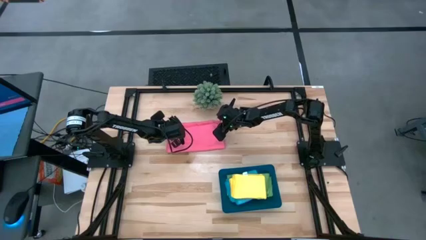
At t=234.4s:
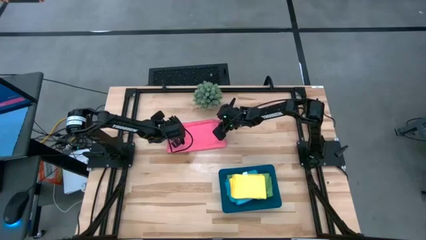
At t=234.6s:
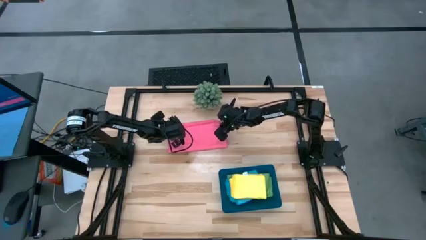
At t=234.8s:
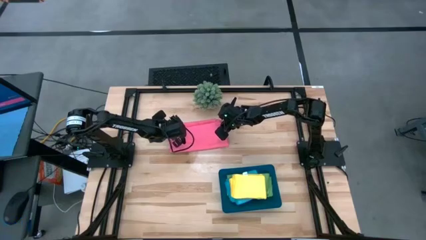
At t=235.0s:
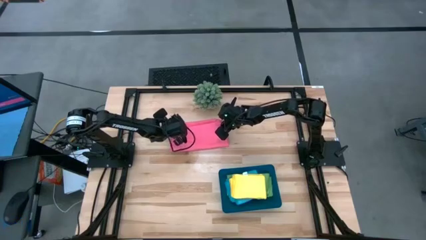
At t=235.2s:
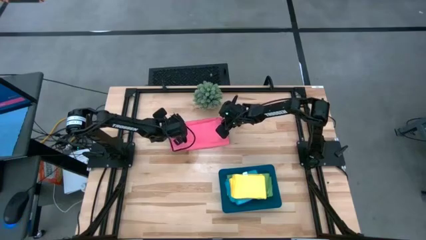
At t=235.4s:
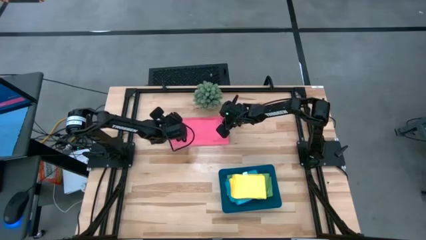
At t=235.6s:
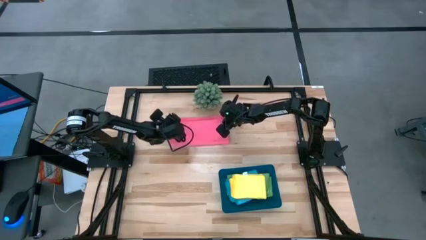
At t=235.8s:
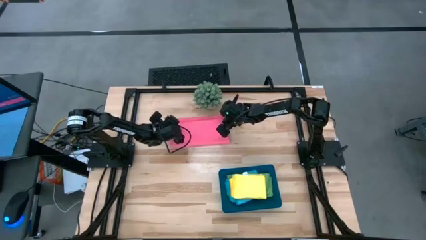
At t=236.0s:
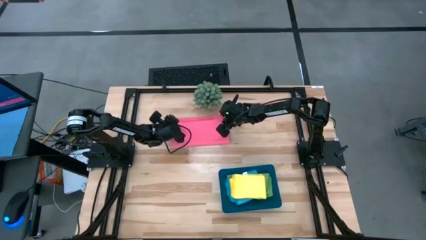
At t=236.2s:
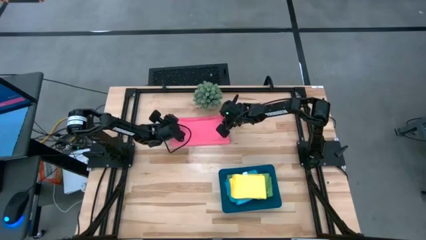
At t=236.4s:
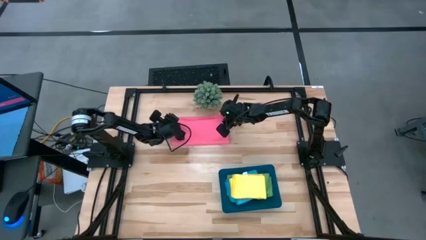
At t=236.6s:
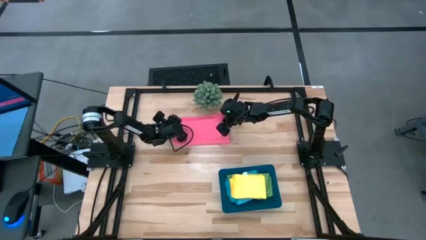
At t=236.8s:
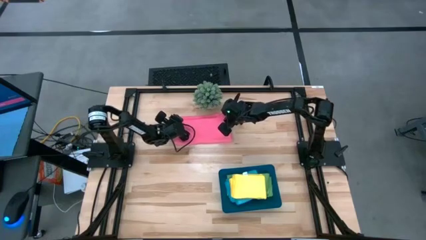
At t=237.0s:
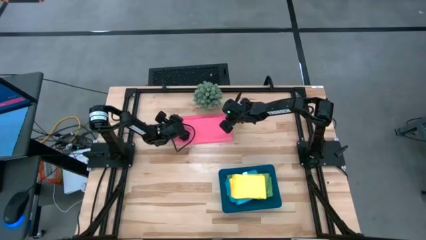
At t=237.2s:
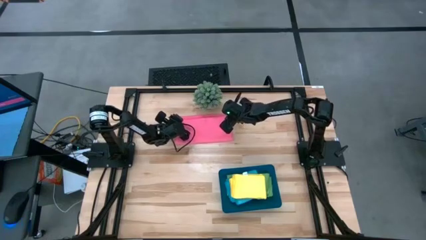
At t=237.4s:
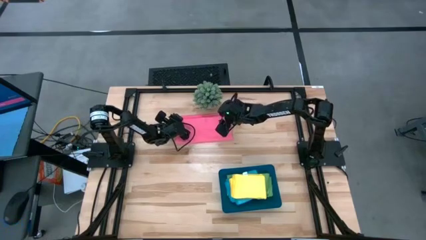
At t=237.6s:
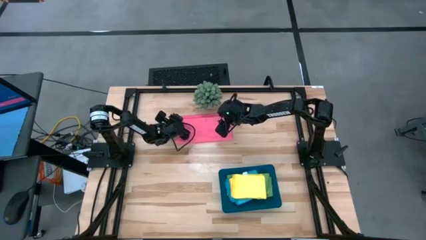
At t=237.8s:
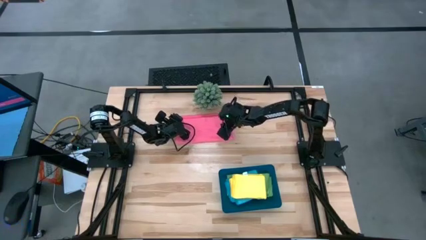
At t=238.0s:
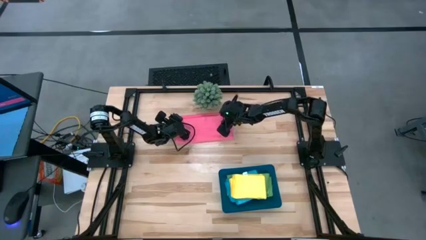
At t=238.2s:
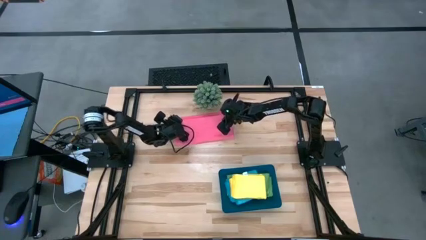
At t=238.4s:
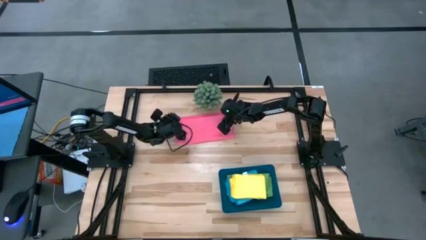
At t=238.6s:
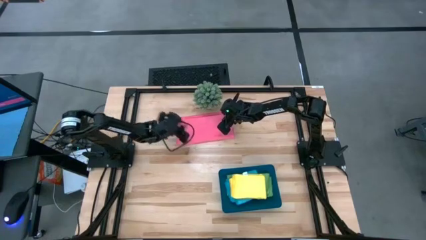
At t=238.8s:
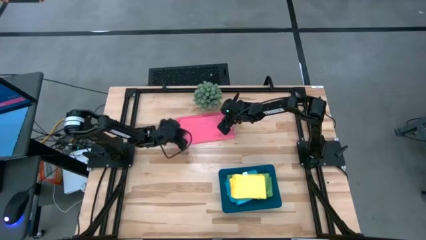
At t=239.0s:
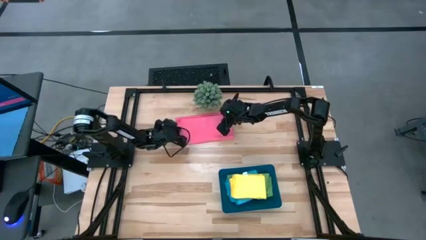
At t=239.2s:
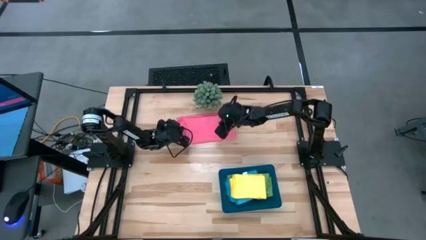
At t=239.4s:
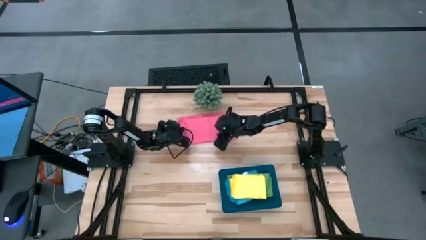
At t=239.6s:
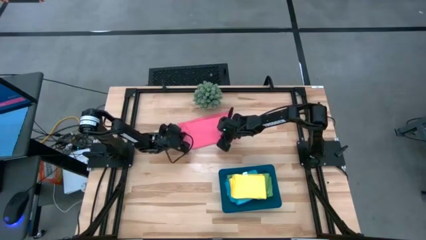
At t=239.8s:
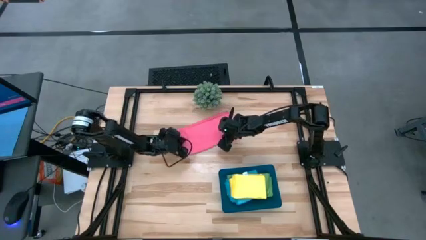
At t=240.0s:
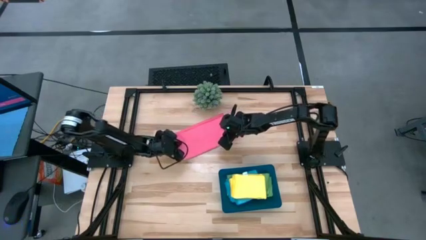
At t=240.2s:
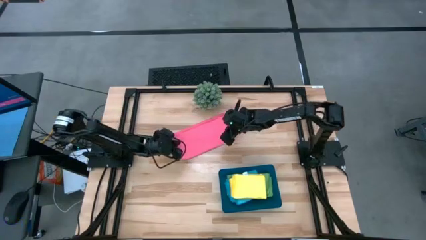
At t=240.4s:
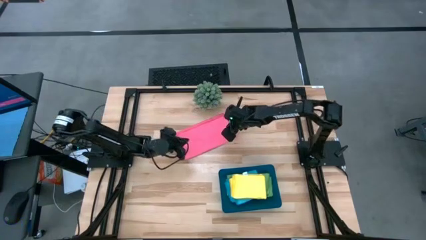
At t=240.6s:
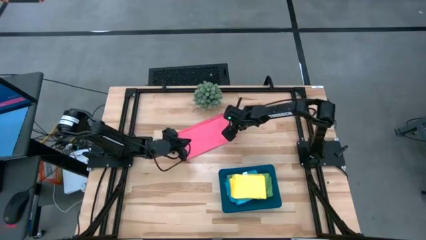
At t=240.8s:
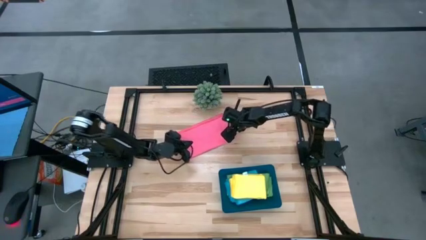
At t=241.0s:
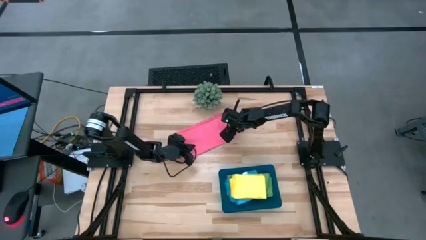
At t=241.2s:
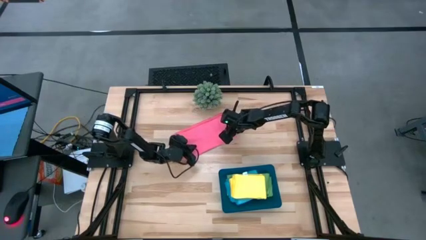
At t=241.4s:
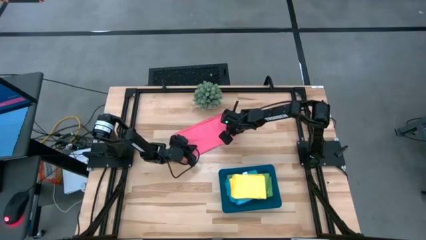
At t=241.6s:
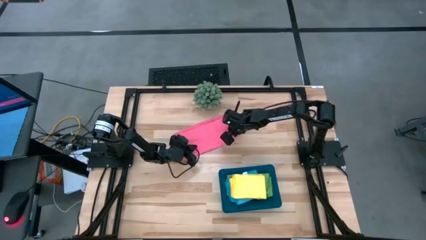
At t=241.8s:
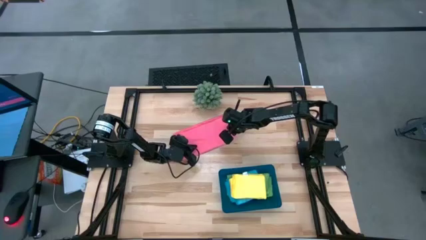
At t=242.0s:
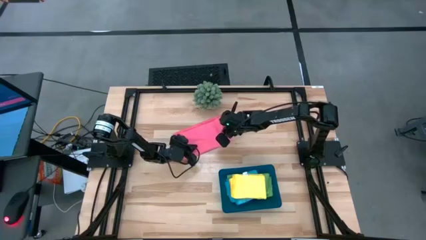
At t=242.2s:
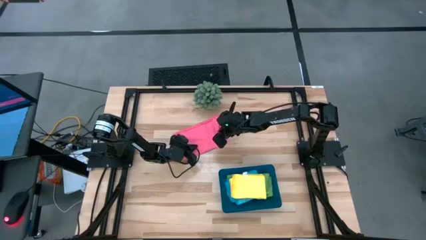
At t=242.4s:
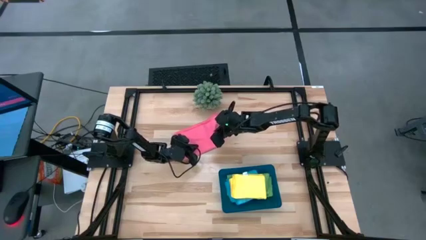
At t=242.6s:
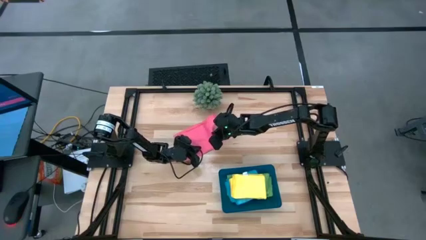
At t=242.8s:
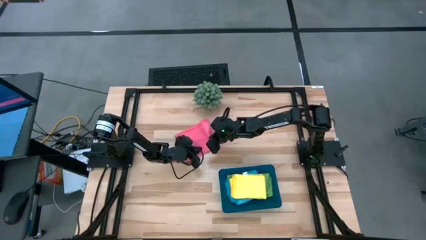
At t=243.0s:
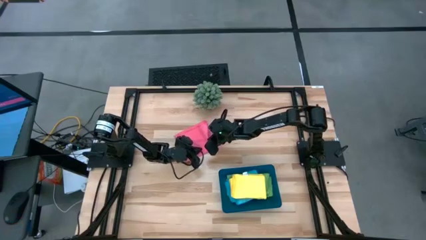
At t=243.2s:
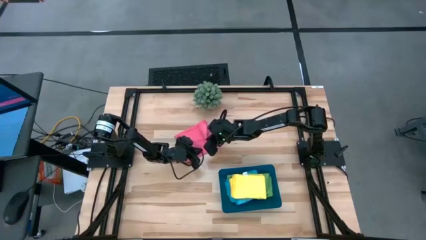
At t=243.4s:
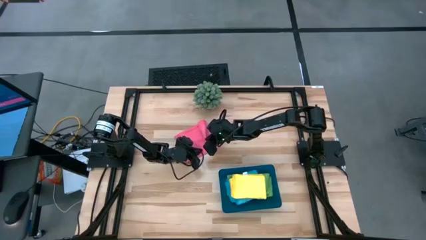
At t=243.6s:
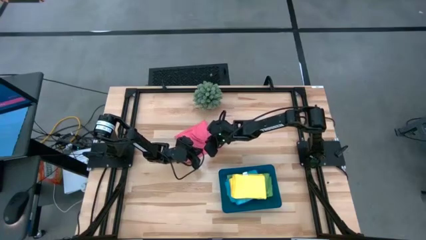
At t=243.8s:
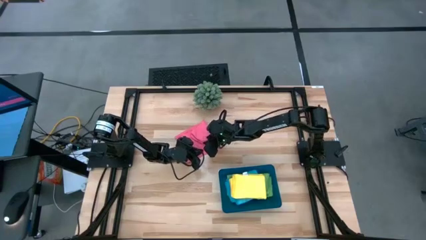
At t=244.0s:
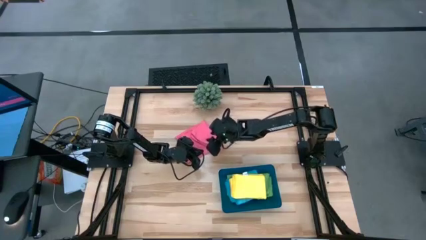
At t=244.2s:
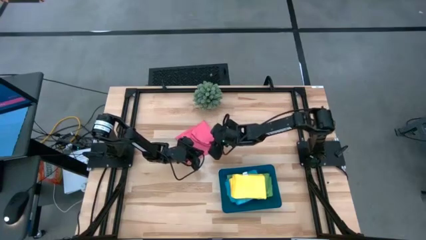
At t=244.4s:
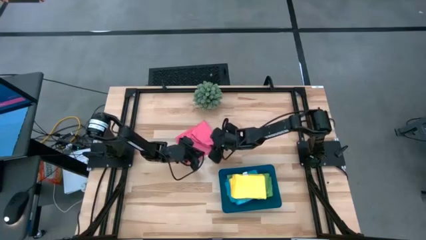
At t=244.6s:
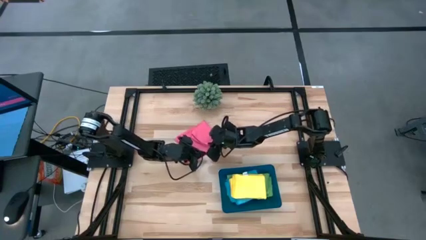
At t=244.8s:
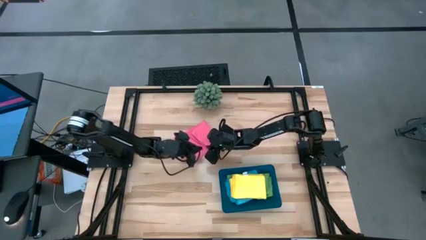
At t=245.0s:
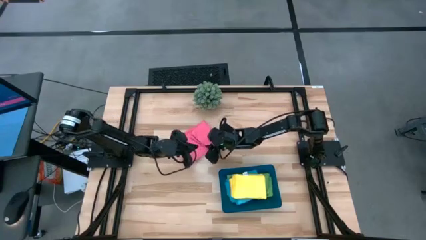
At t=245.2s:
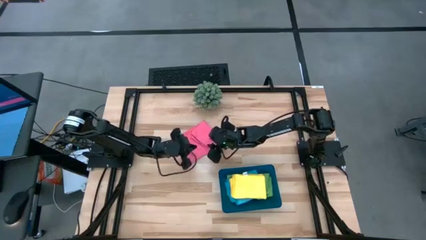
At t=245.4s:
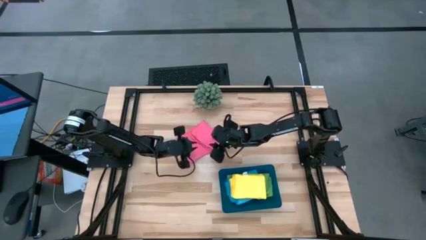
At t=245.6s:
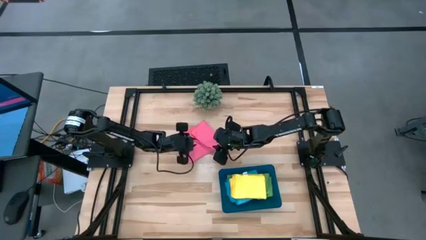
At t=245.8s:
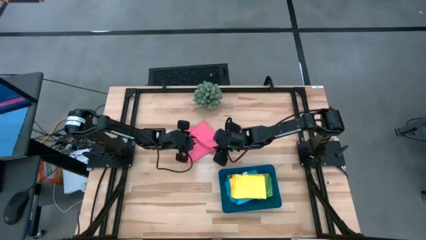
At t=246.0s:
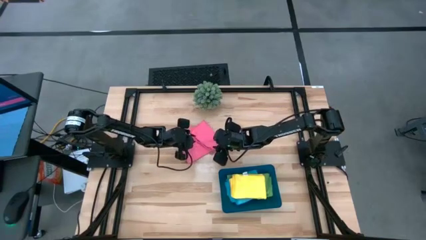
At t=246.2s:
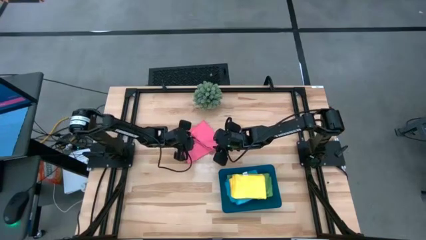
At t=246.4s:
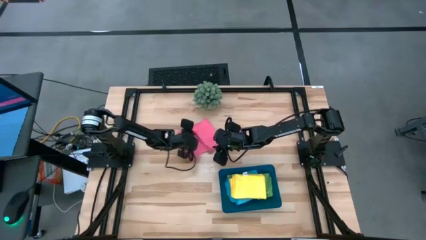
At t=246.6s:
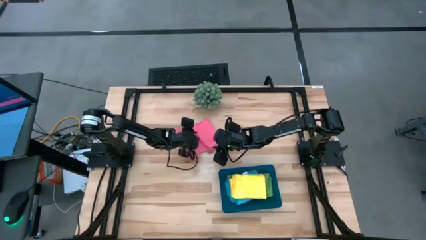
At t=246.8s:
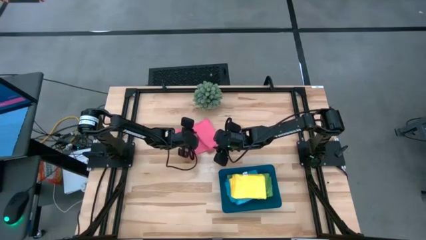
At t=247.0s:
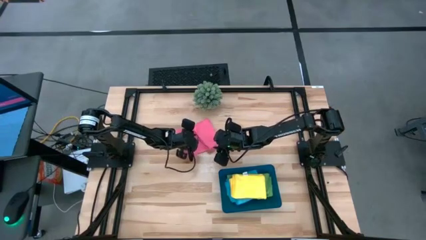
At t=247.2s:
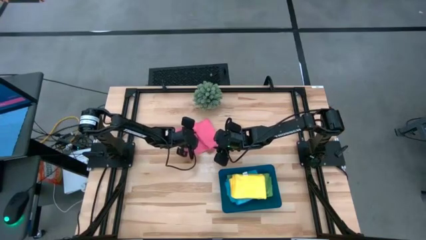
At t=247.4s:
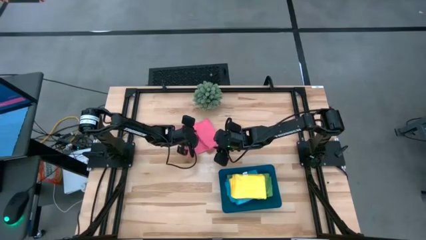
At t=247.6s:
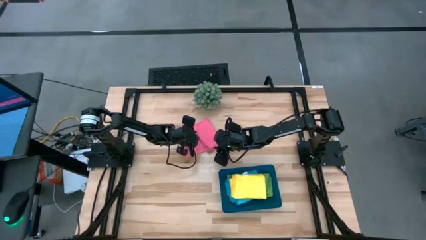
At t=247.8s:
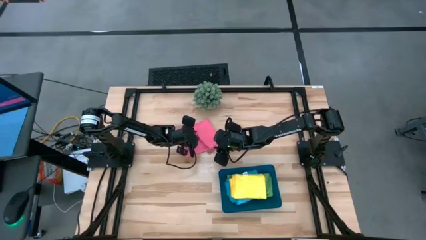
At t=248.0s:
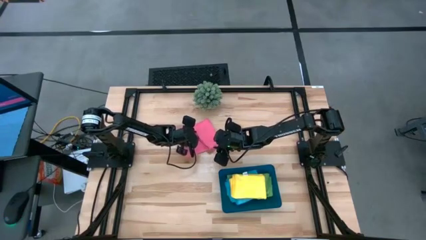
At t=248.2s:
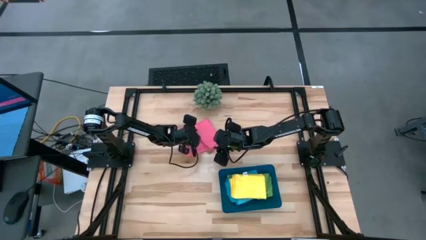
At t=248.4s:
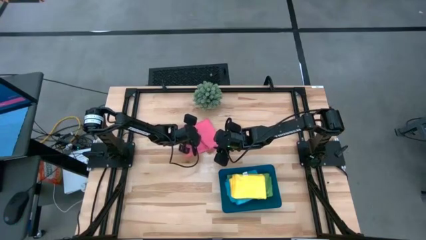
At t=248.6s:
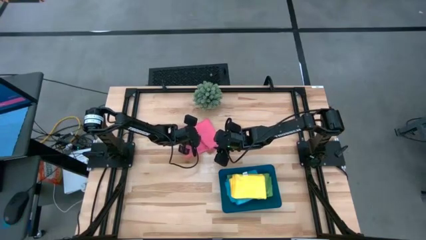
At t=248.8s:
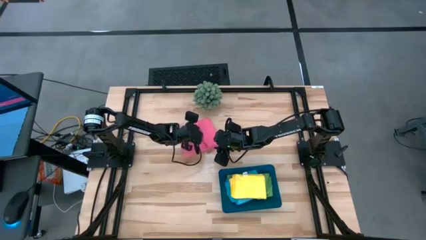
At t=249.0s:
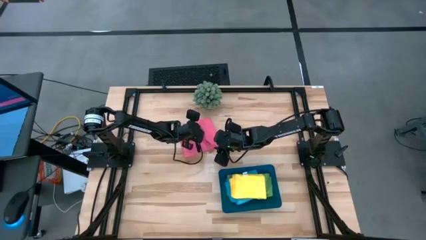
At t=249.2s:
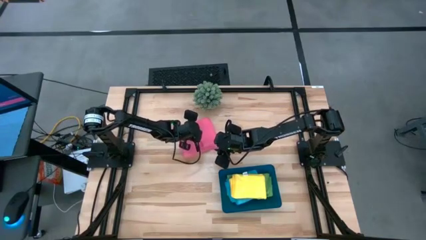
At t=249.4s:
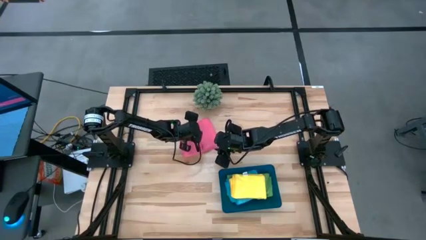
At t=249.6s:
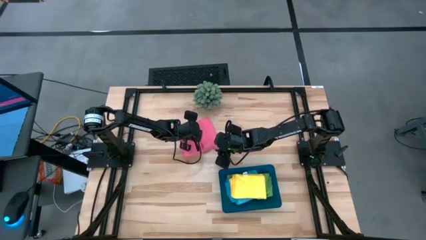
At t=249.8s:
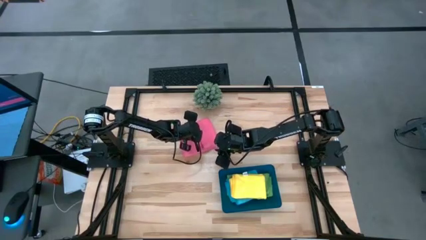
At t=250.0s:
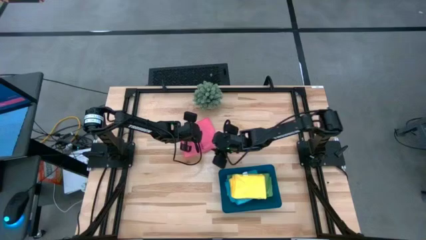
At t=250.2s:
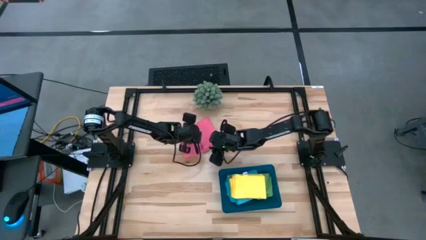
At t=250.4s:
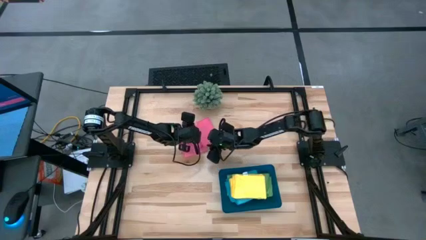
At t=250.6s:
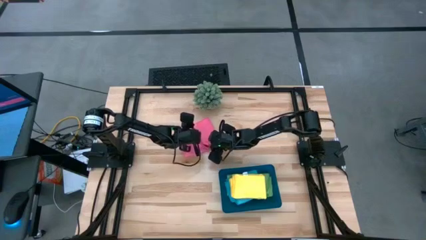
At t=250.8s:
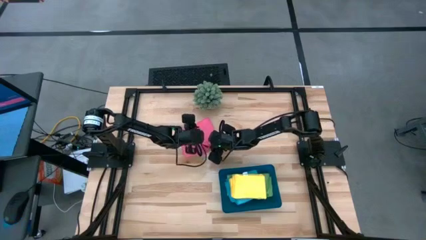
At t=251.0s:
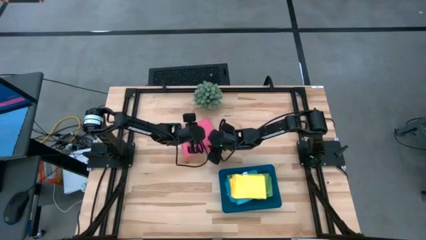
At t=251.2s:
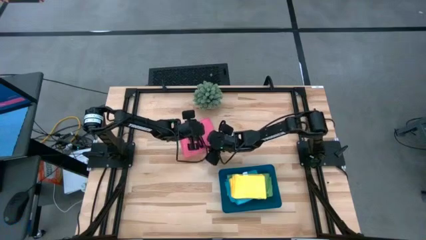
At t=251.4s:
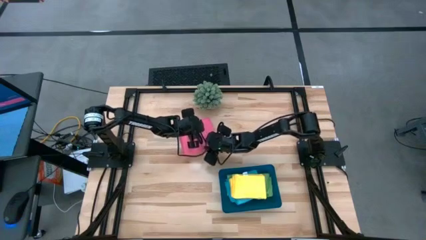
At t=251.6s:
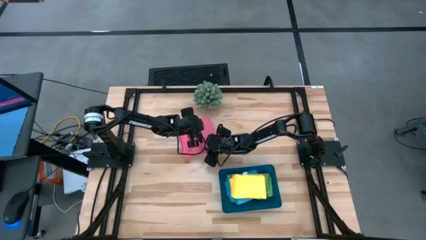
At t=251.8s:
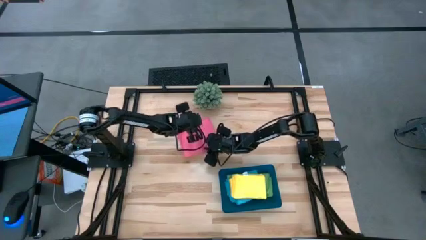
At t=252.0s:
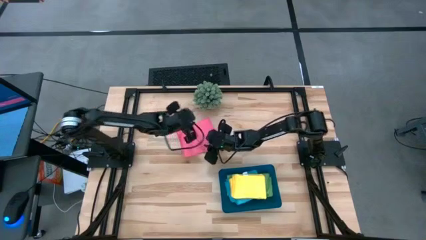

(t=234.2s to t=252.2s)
Task: Fold microfiber towels
Fold the pink microfiber towel
